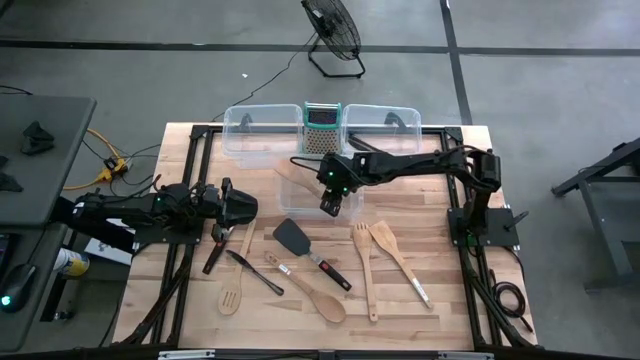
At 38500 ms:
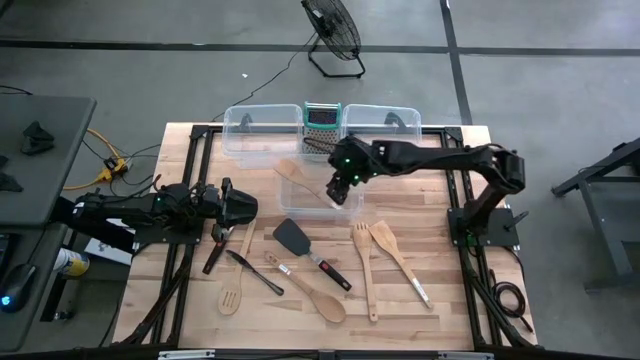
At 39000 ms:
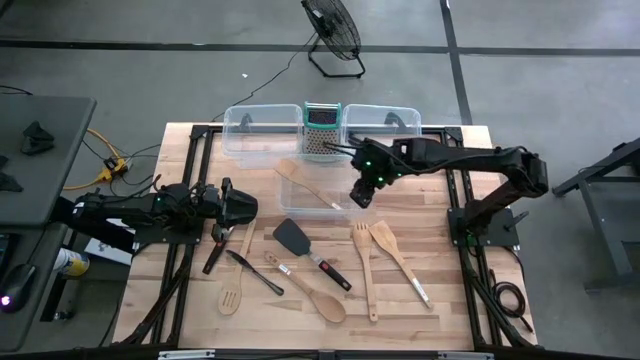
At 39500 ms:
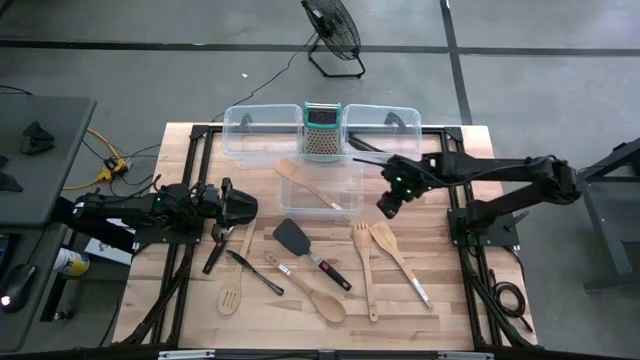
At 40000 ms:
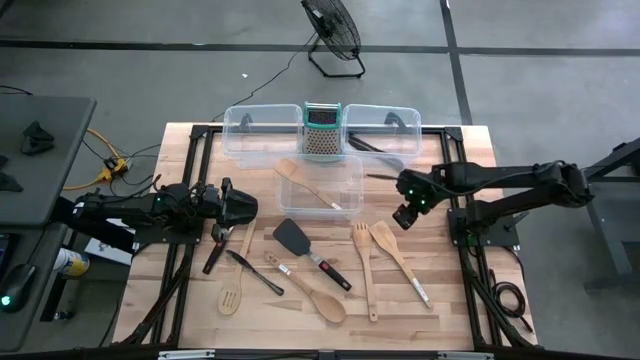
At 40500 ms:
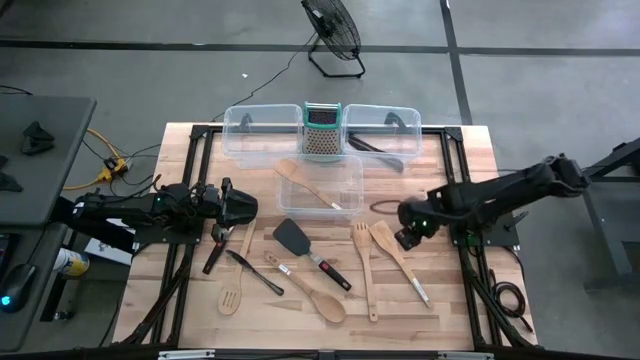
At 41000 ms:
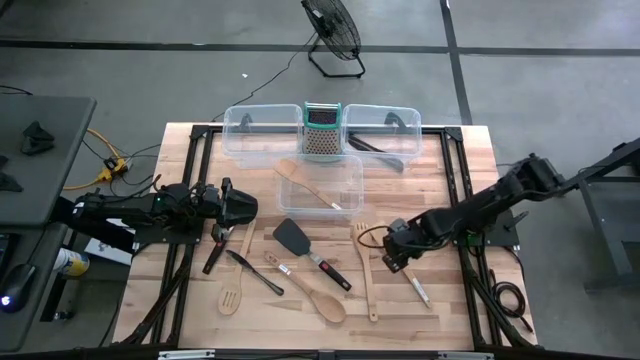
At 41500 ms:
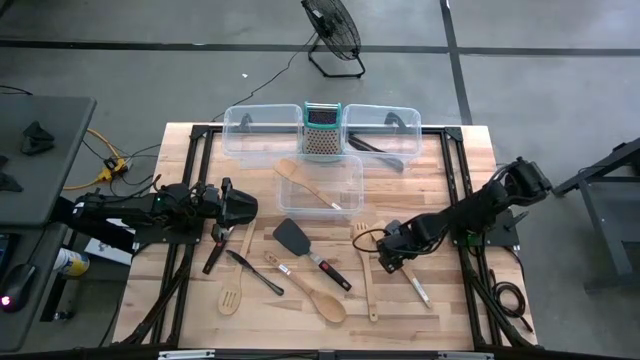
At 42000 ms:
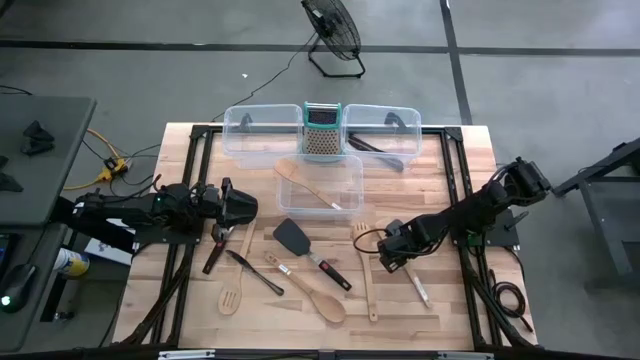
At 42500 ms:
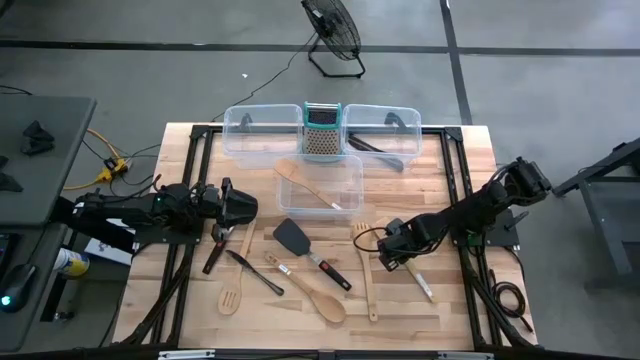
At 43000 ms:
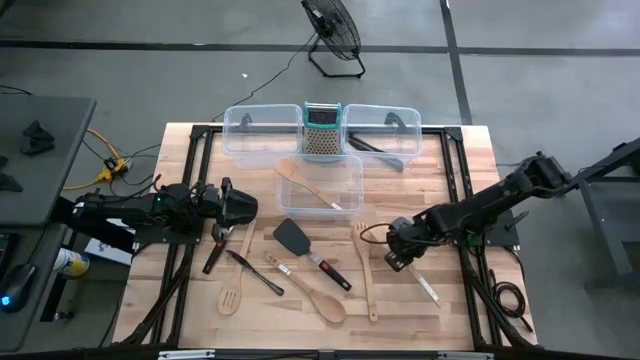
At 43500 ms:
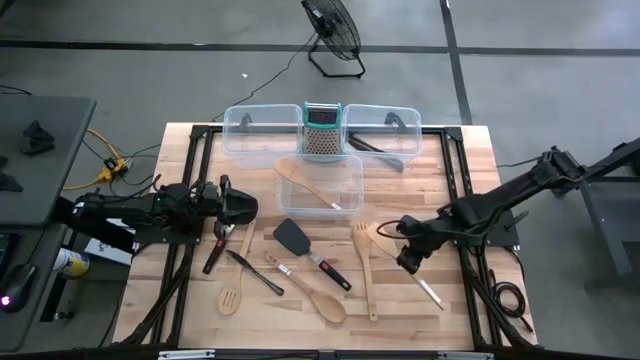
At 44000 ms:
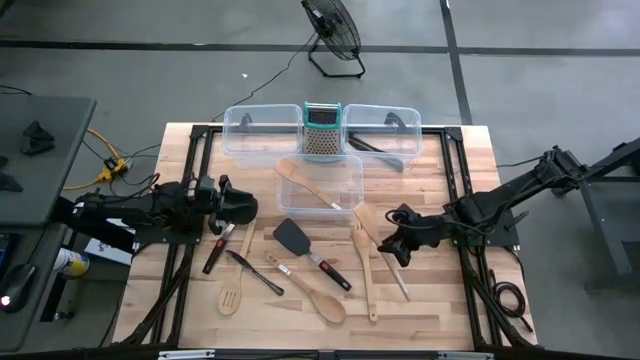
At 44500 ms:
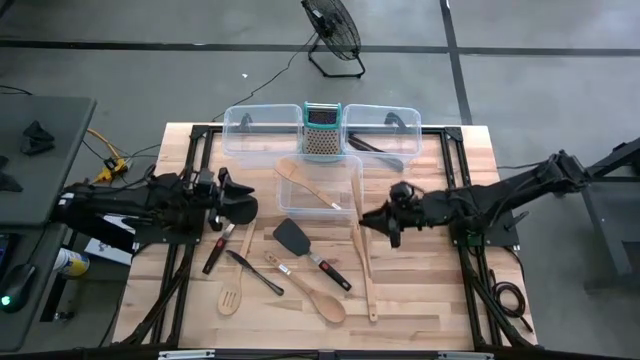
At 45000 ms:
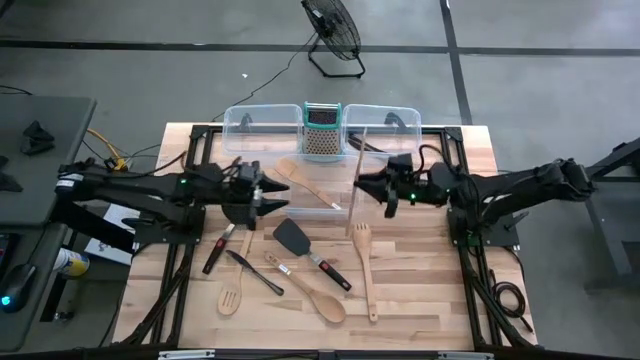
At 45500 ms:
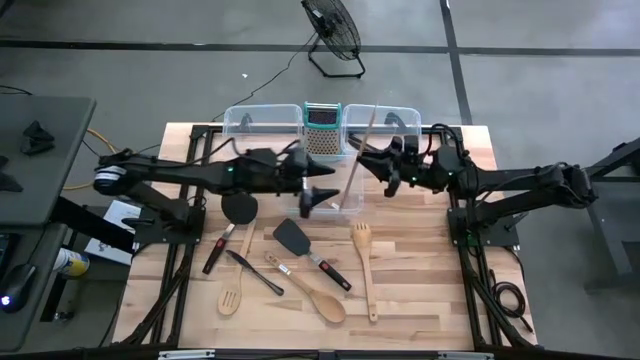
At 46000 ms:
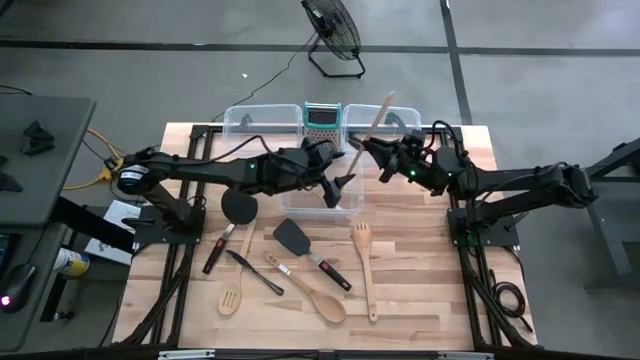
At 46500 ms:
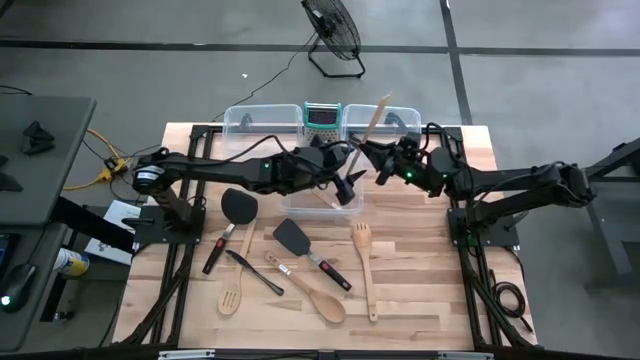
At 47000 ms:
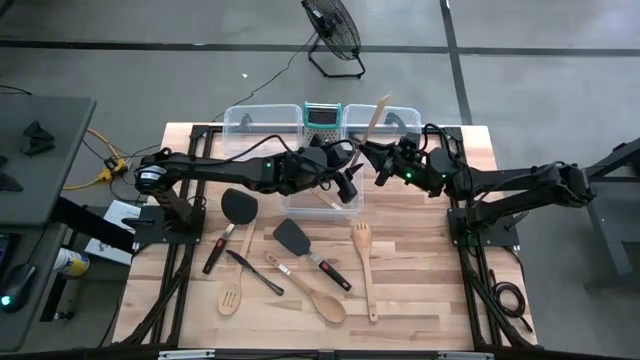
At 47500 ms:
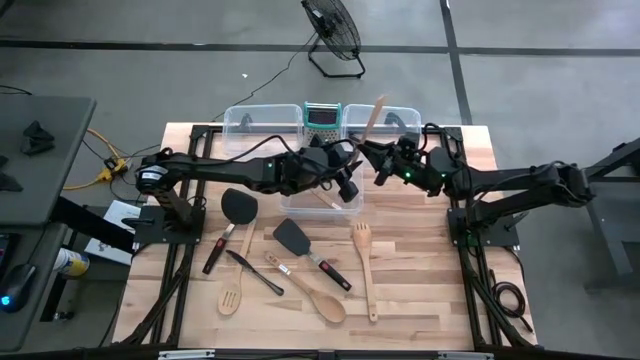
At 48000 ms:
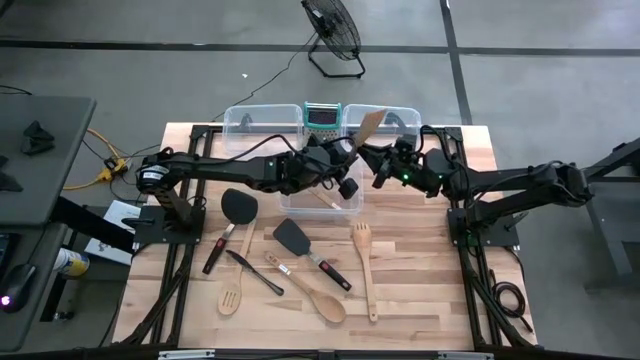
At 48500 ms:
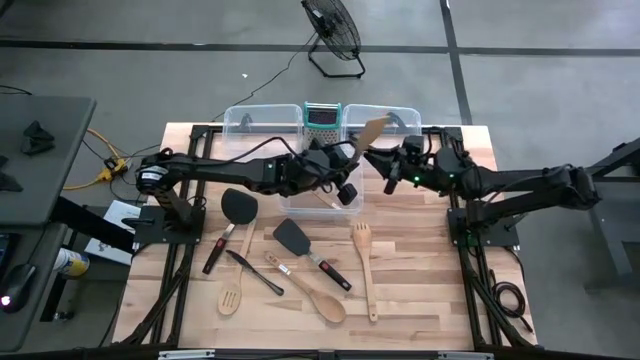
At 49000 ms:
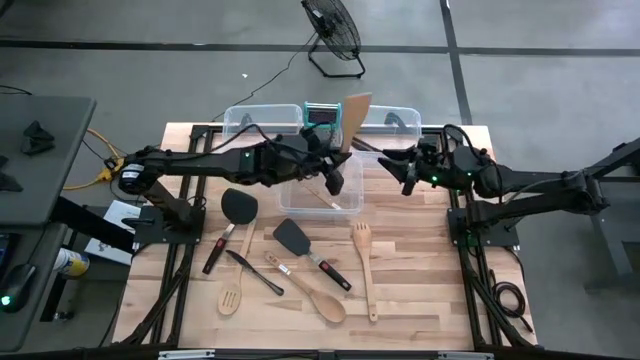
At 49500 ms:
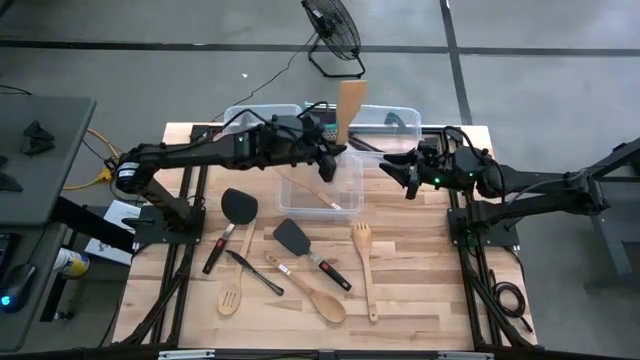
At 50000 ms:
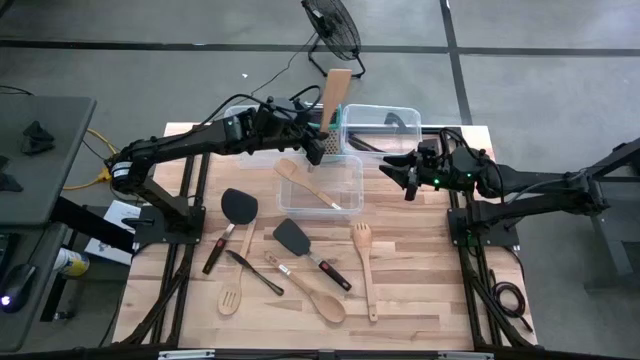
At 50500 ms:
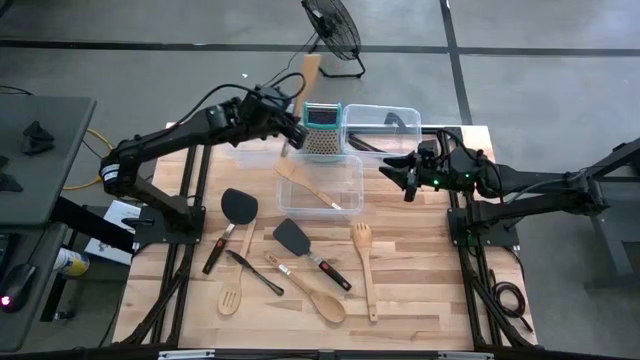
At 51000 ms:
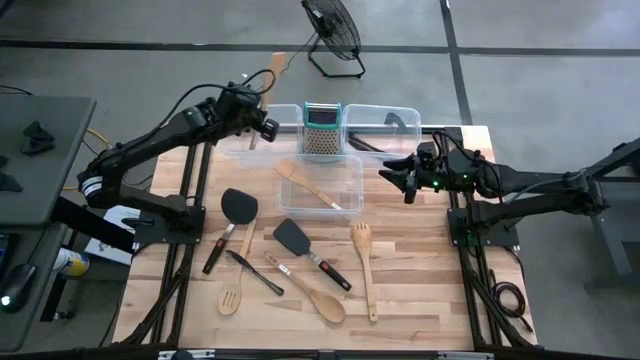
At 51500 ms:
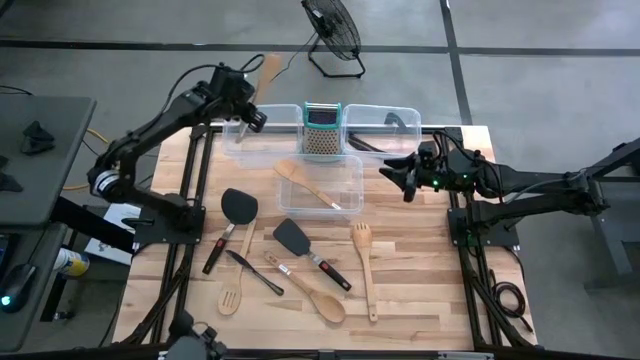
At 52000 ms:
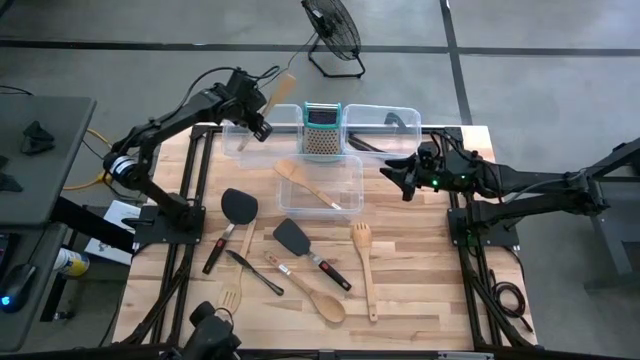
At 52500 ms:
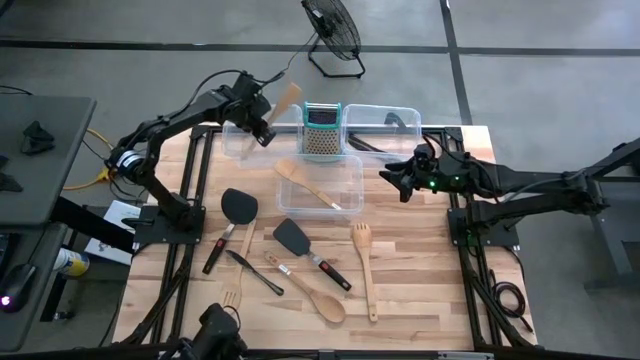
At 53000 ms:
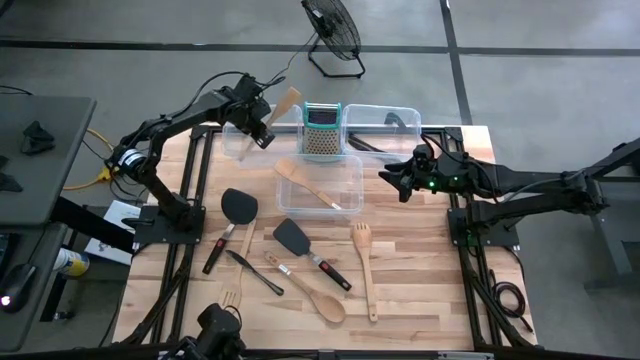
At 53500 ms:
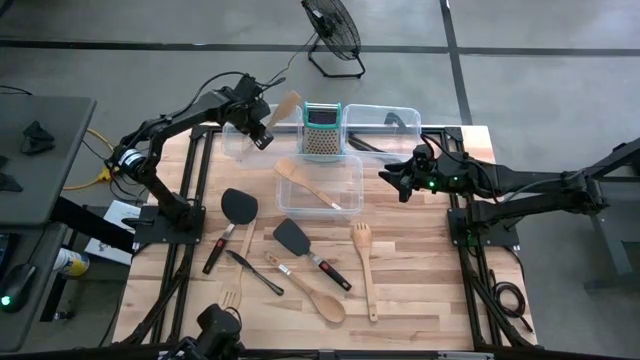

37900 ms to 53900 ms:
Task: Pick & Place Kitchen Items
Put the light brown spatula into the left transparent bin

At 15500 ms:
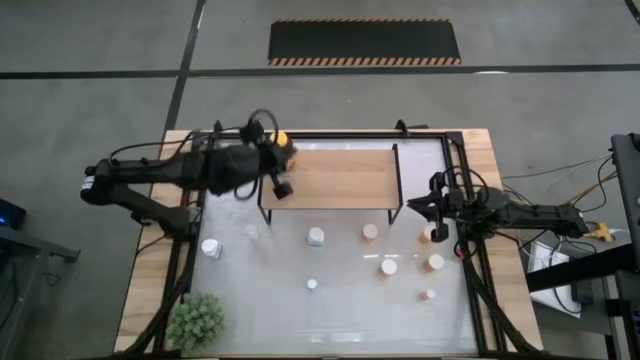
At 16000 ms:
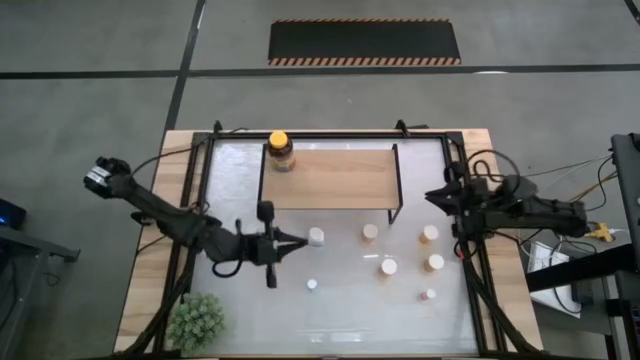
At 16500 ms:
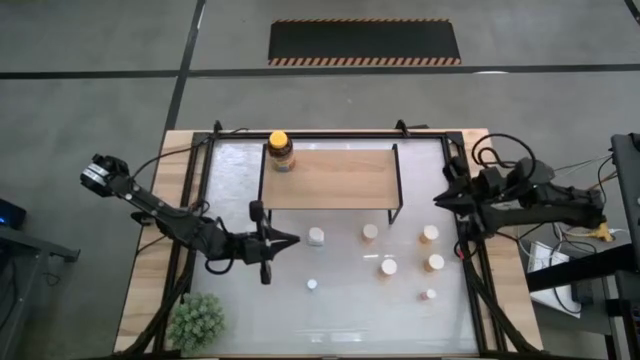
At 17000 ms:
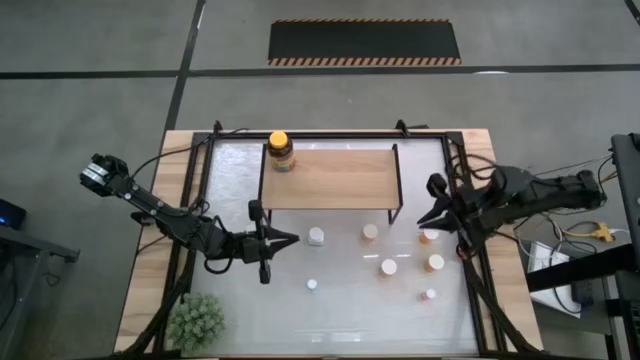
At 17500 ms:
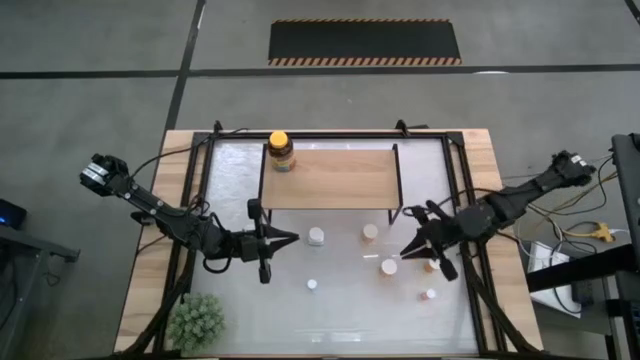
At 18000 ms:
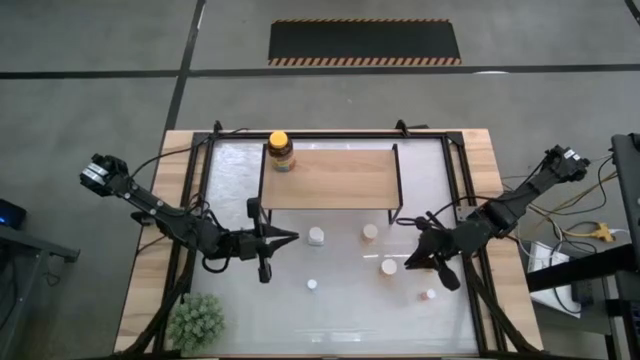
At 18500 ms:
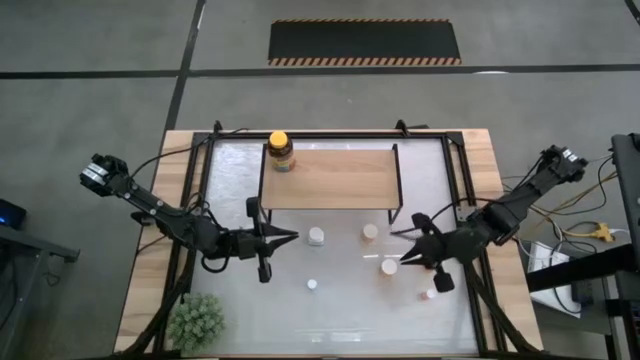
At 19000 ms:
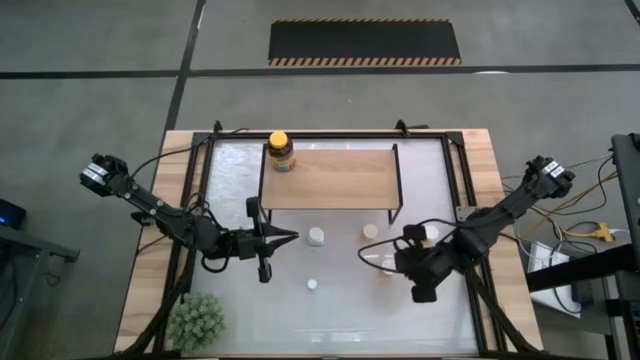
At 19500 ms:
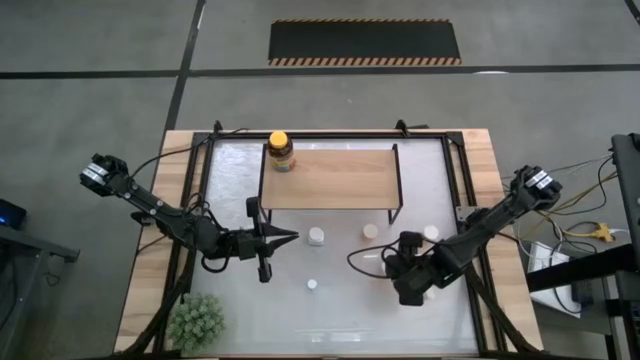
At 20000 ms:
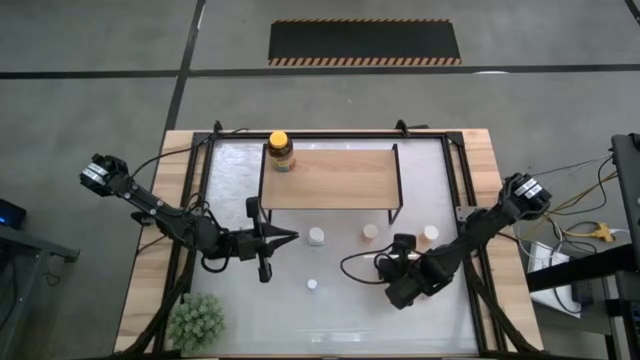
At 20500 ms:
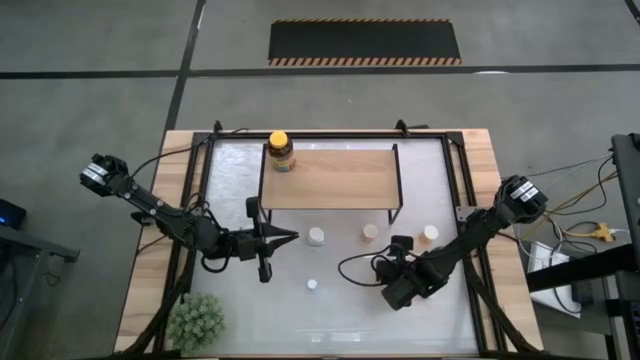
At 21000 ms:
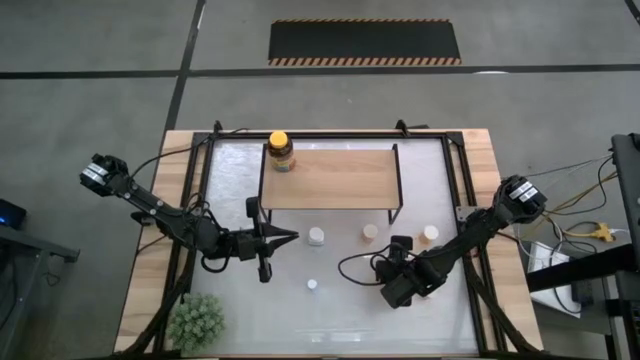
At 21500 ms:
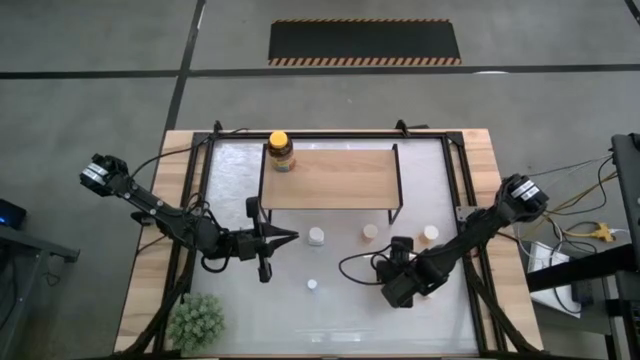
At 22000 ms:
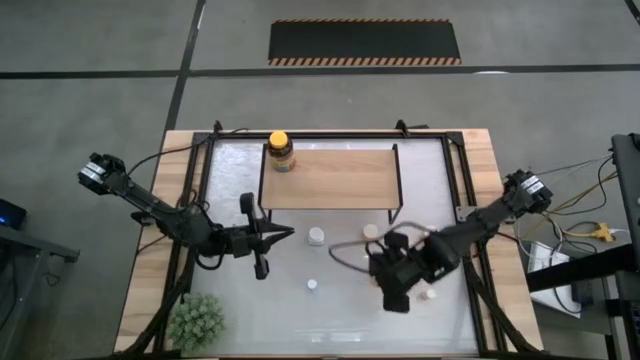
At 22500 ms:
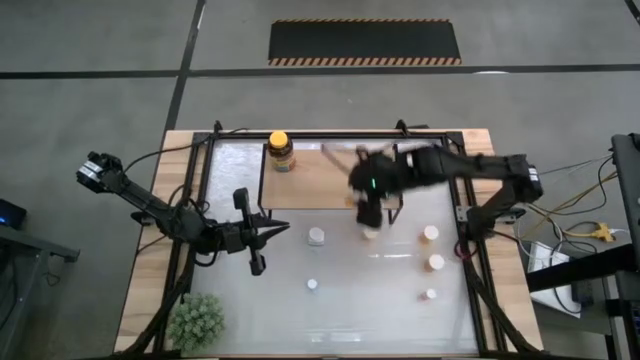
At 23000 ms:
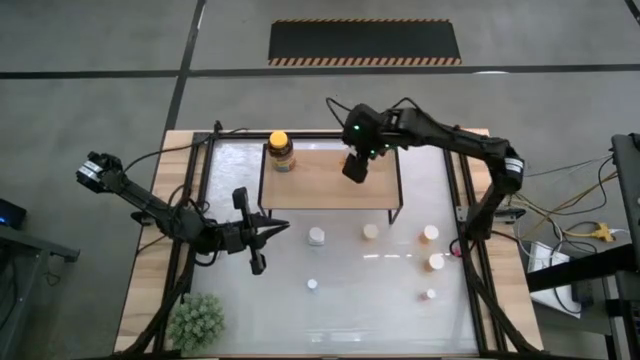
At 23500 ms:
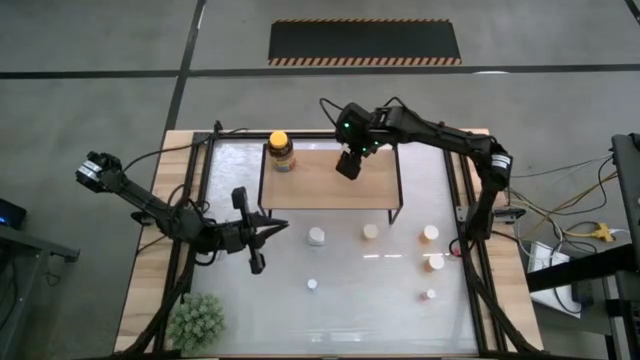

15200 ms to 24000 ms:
Task: Pick and place medicine bottles onto shelf by color
Put the orange pill bottle on the shelf
